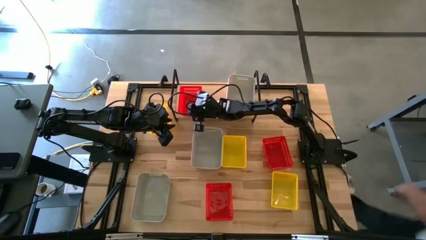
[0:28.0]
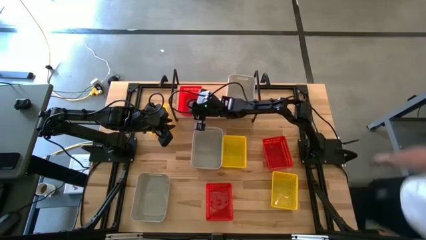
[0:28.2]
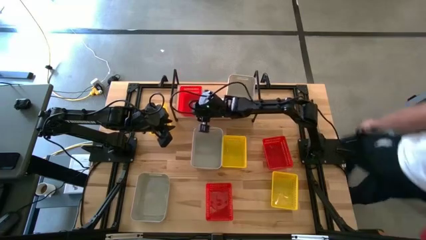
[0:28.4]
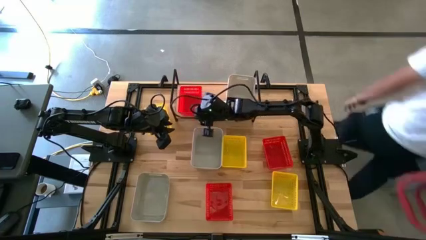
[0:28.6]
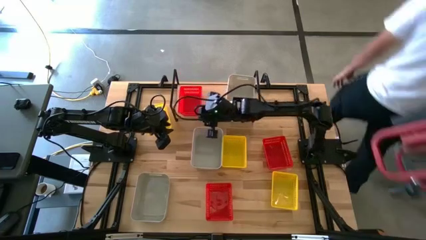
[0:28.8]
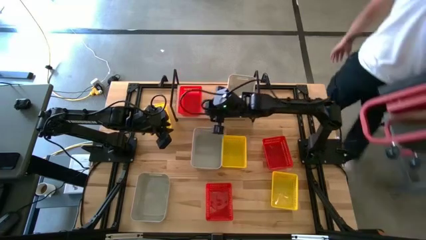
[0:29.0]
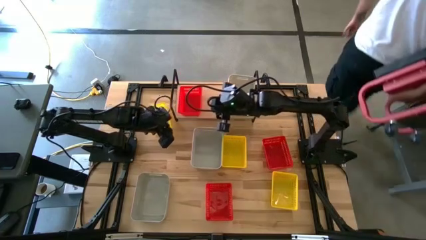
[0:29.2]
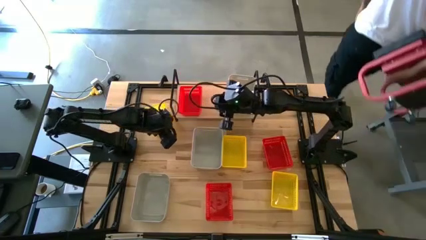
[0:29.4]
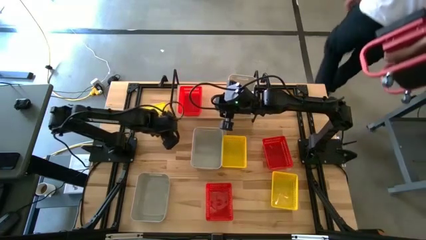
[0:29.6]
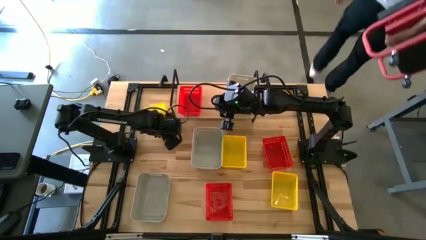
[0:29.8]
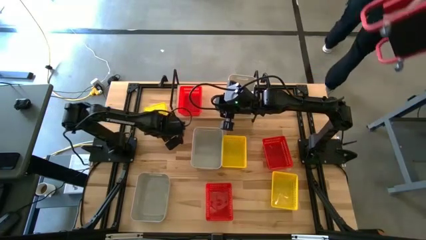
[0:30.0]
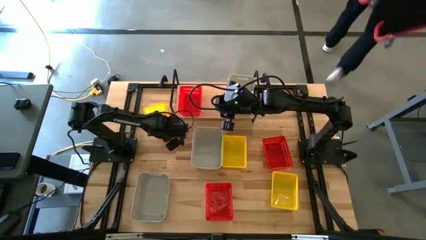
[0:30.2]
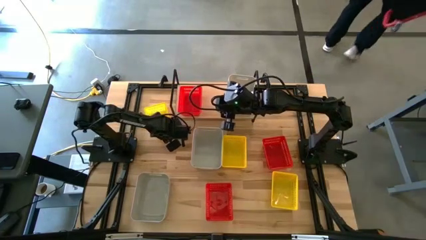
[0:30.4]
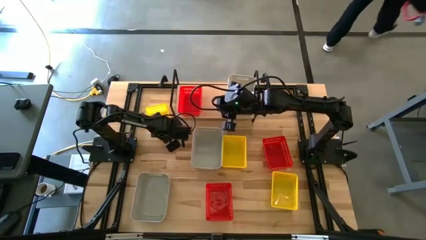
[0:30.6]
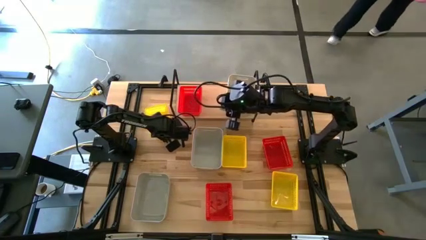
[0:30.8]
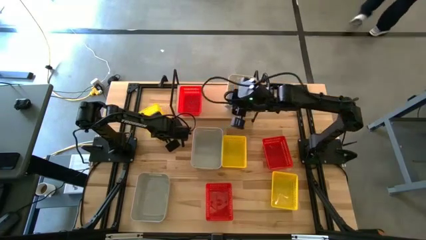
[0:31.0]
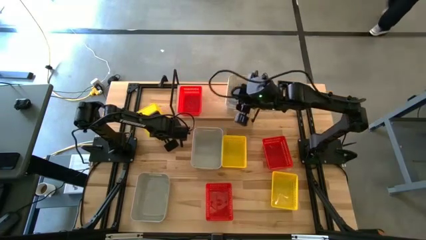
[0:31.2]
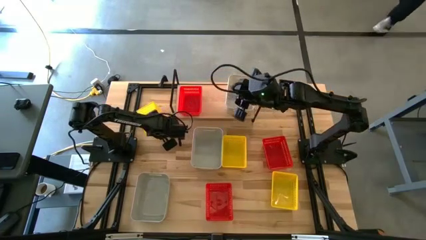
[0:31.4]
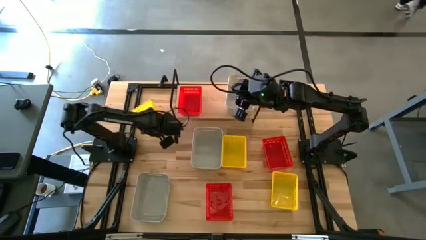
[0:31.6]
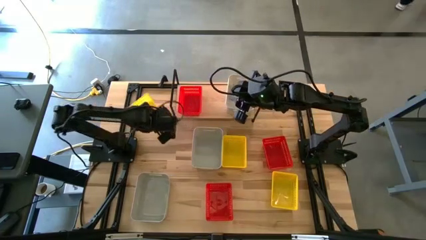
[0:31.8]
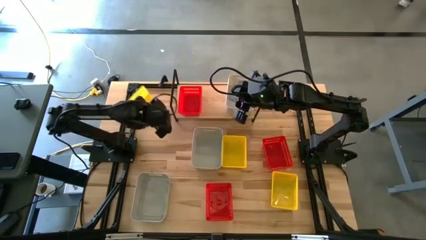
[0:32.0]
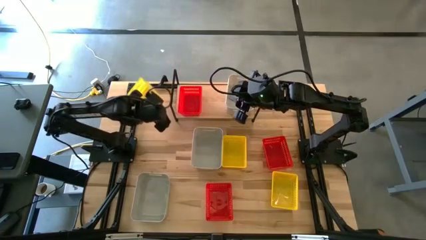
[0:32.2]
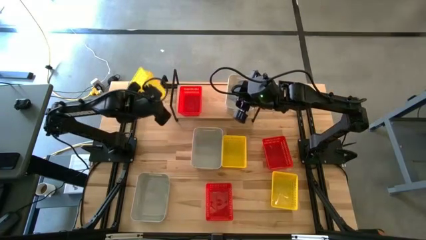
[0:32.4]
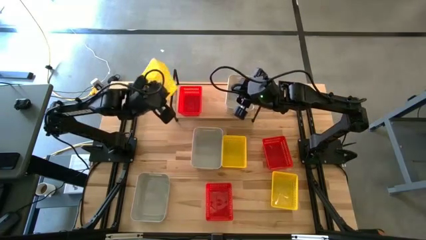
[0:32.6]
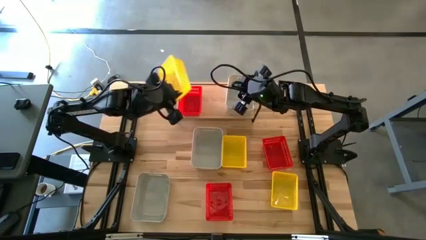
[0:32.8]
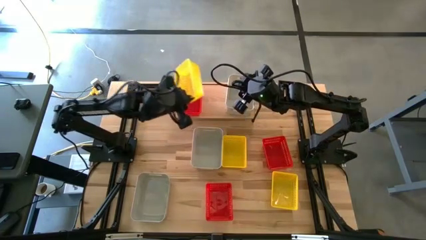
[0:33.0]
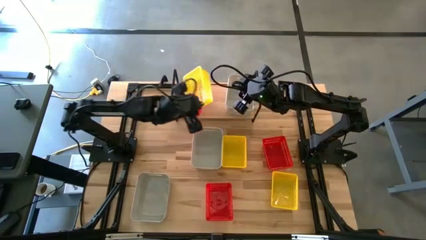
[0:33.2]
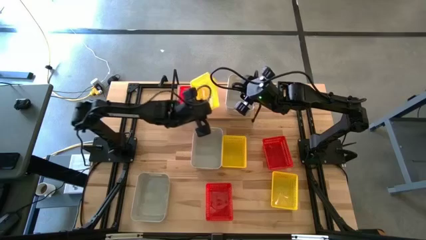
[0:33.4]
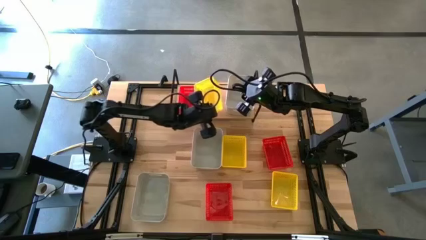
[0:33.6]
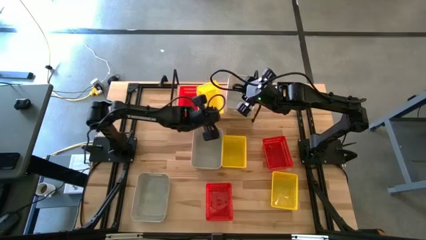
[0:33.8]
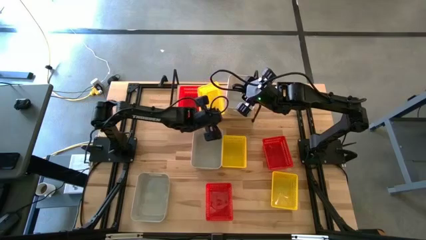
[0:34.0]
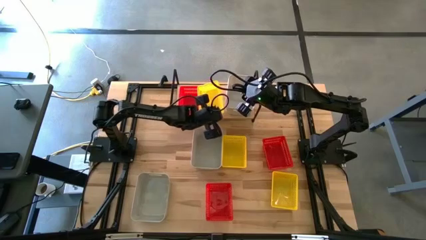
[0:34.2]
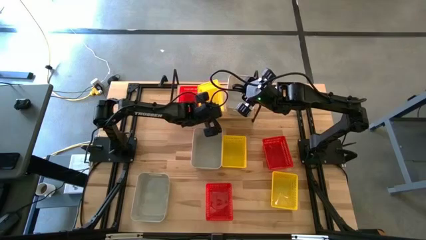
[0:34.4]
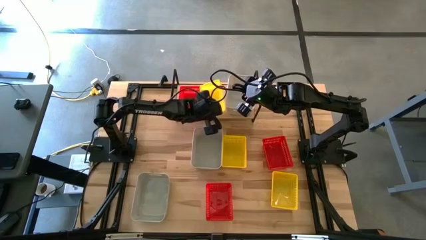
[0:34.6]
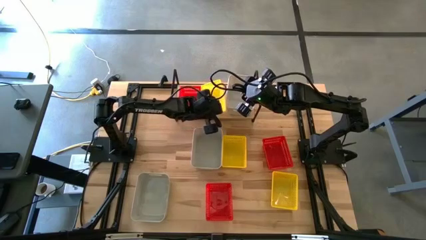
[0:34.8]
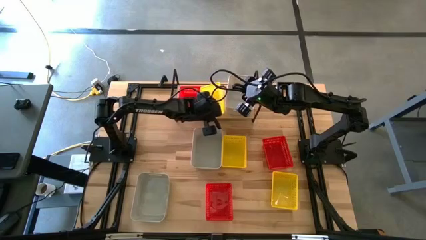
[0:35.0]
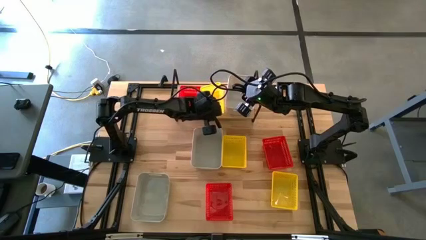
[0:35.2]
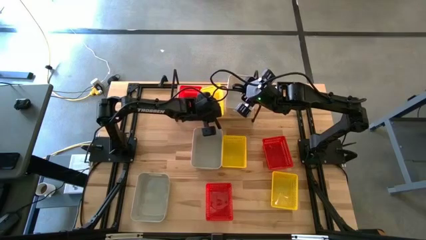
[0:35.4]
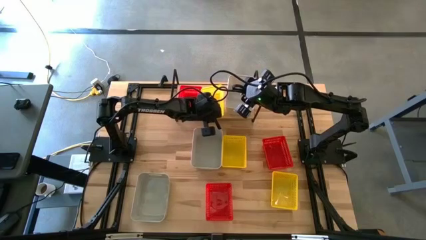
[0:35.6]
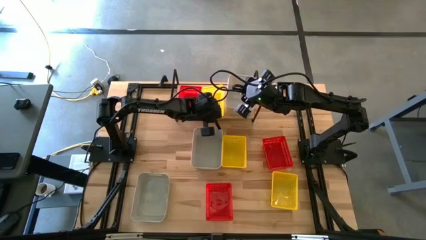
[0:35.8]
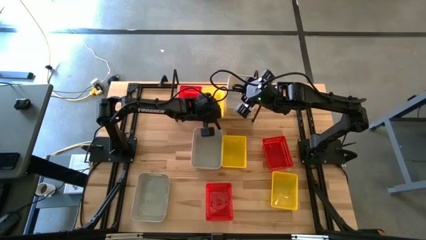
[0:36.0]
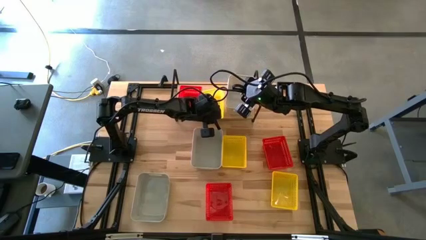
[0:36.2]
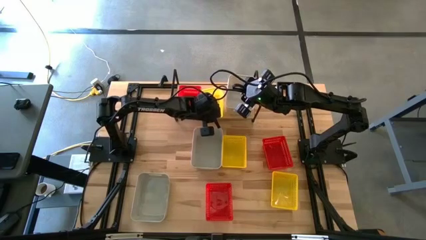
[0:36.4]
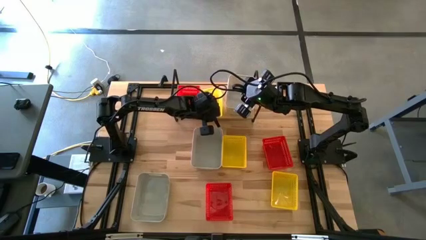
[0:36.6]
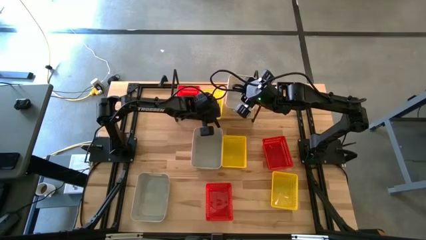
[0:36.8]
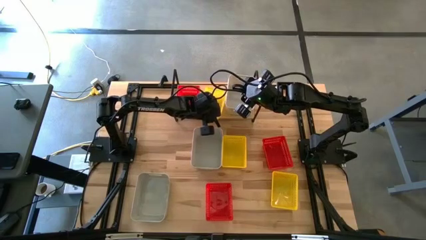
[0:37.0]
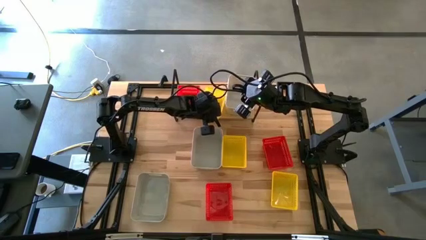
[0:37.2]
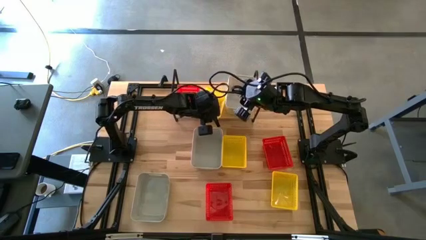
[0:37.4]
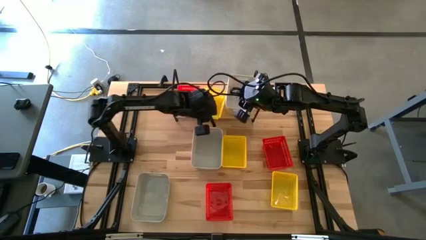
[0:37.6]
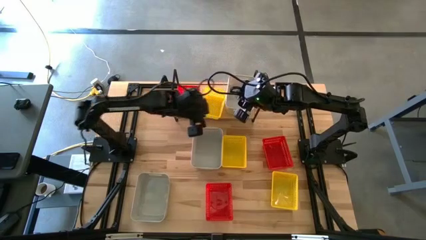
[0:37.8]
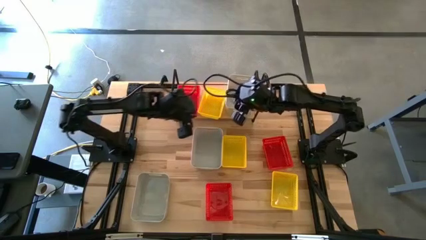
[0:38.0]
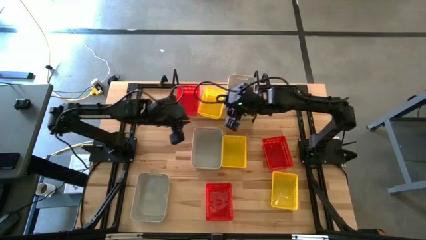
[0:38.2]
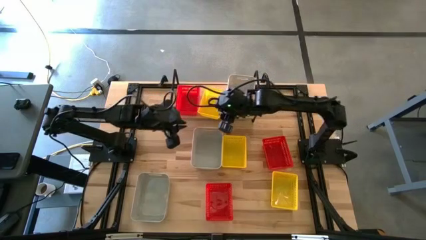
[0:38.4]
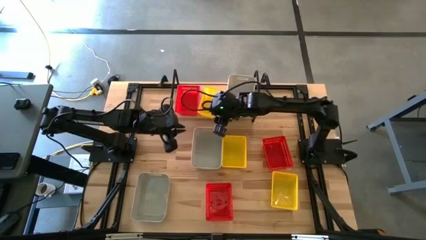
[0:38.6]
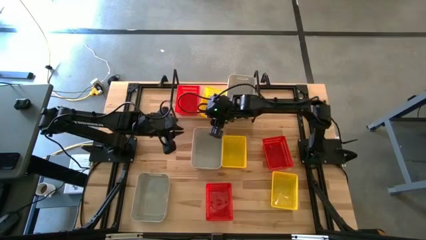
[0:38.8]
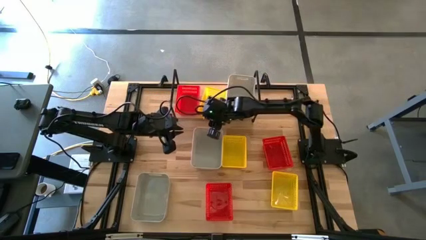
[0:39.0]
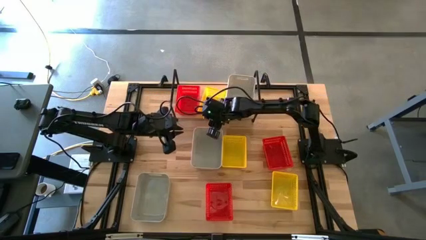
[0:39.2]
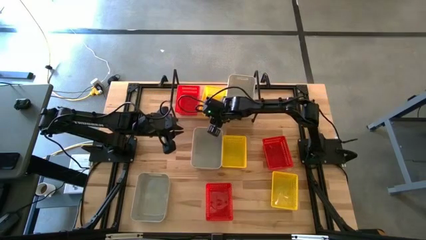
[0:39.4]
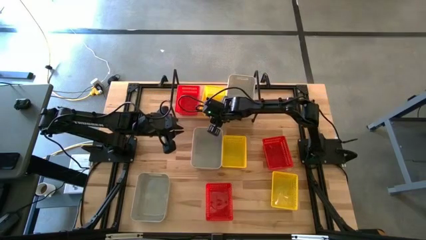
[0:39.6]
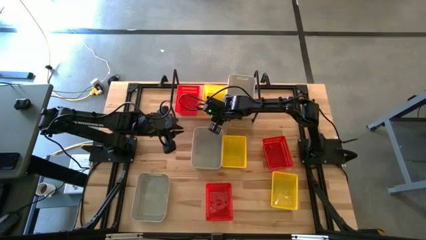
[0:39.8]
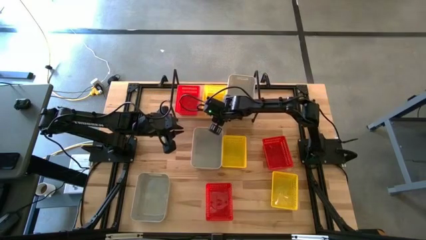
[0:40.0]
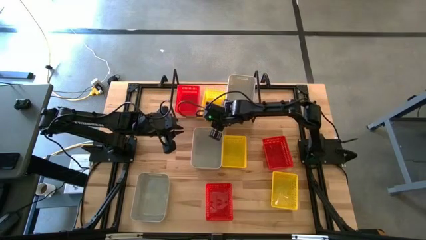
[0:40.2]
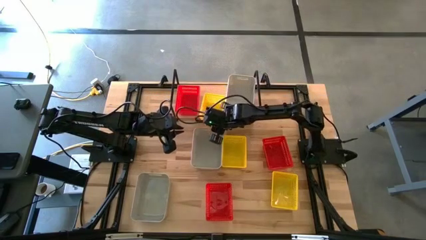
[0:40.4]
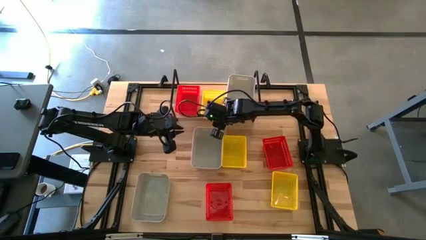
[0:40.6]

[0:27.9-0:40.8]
Task: Stack baskets on shelf by color
Put the top yellow bin on the shelf
